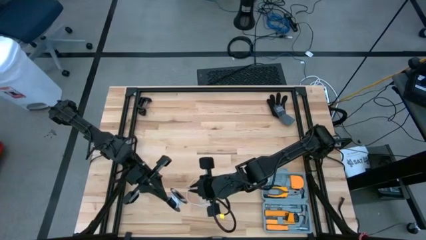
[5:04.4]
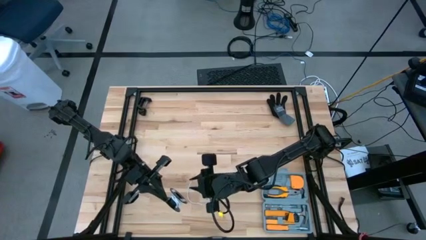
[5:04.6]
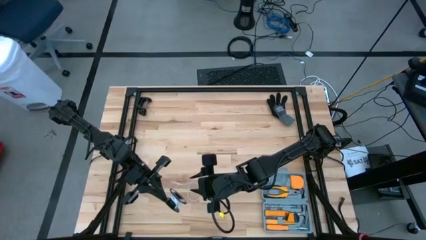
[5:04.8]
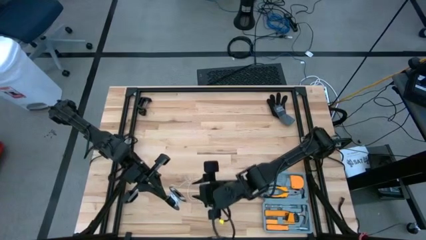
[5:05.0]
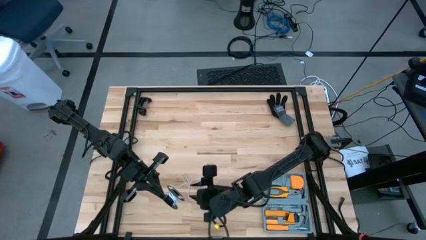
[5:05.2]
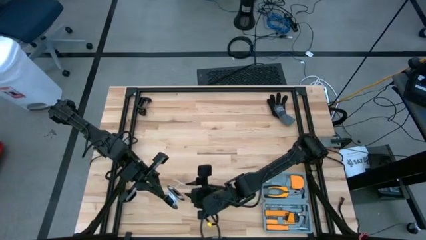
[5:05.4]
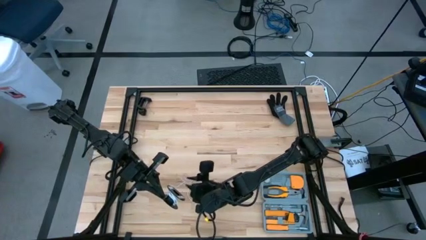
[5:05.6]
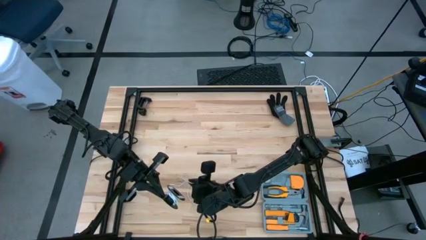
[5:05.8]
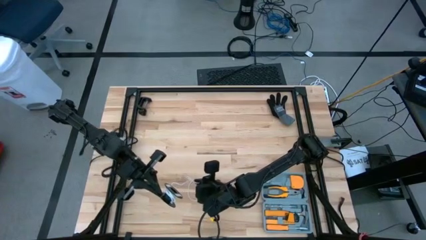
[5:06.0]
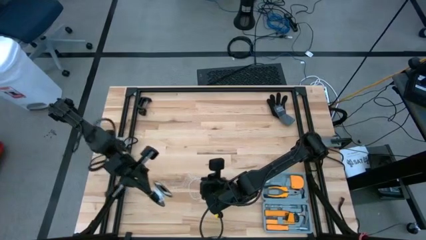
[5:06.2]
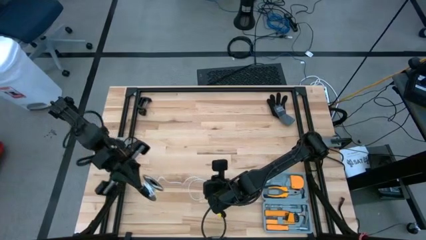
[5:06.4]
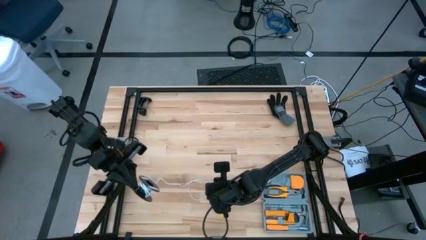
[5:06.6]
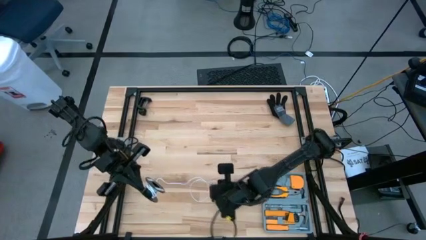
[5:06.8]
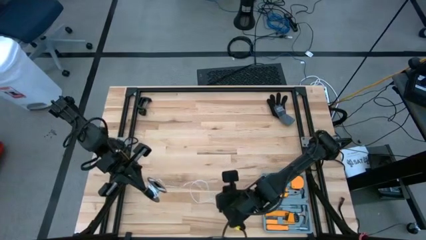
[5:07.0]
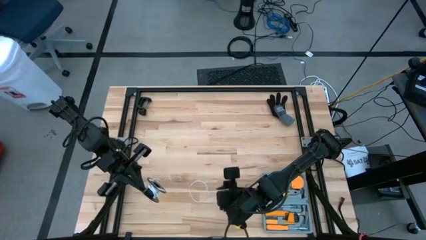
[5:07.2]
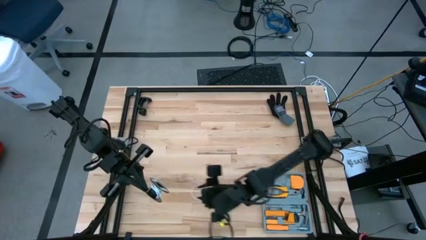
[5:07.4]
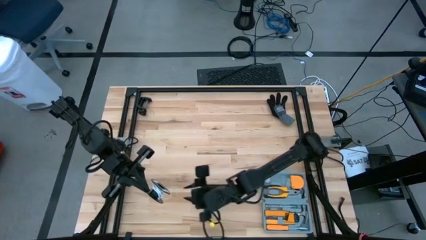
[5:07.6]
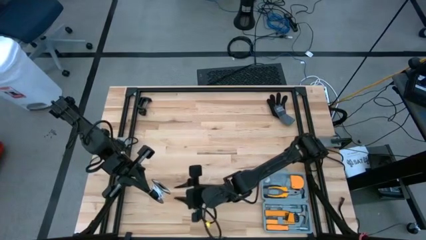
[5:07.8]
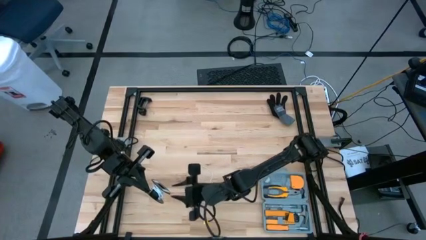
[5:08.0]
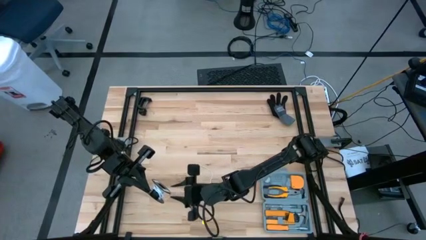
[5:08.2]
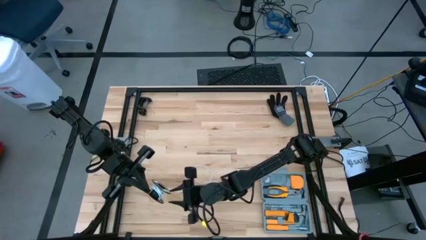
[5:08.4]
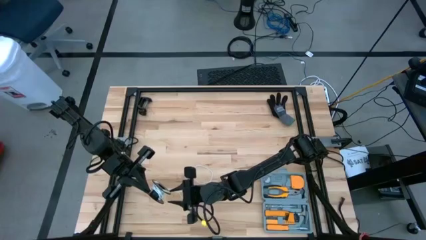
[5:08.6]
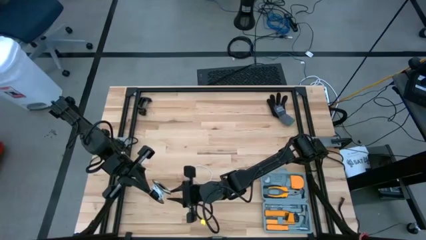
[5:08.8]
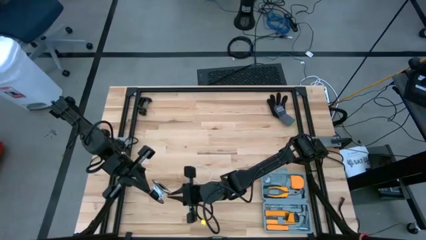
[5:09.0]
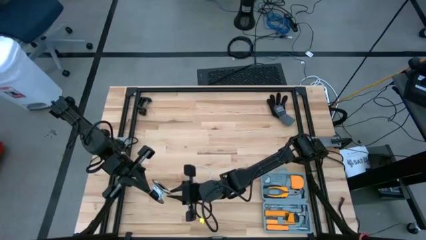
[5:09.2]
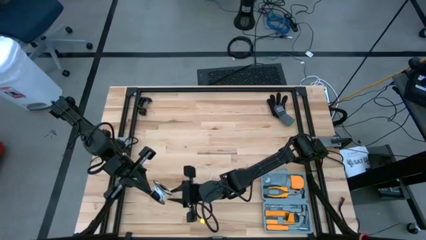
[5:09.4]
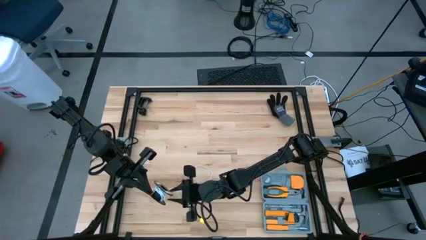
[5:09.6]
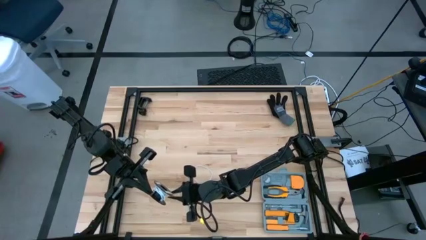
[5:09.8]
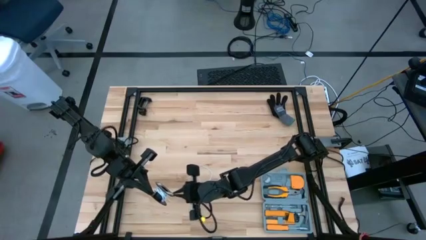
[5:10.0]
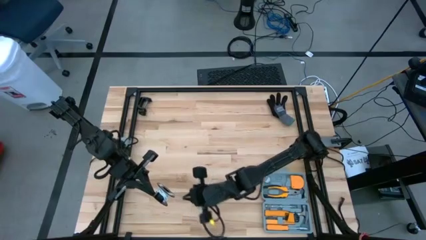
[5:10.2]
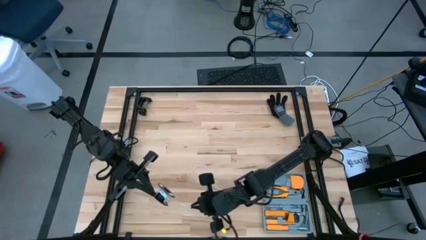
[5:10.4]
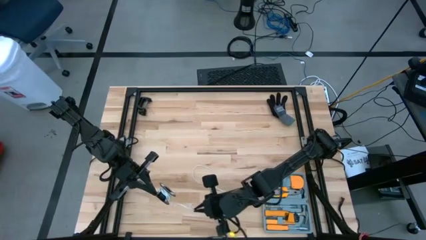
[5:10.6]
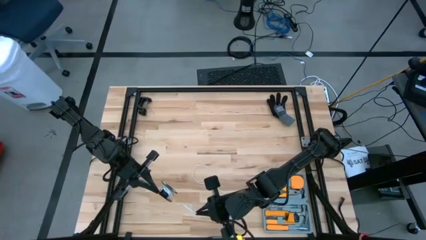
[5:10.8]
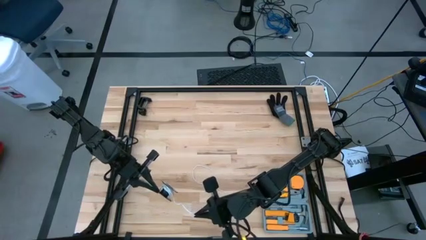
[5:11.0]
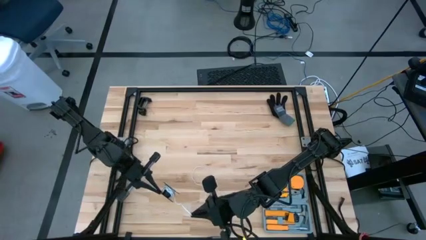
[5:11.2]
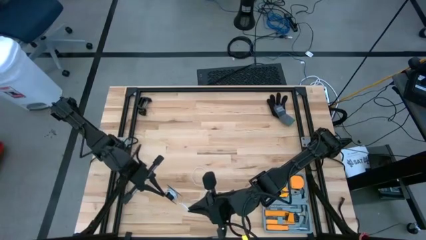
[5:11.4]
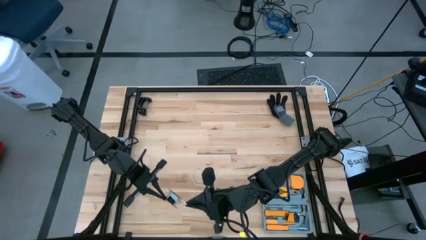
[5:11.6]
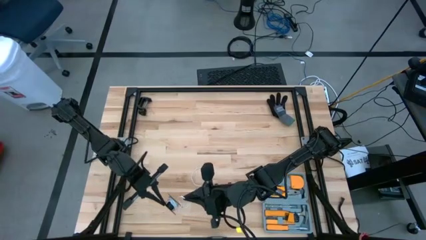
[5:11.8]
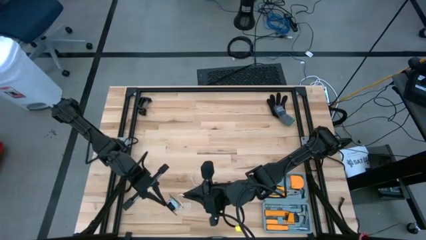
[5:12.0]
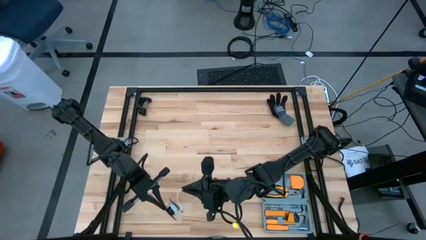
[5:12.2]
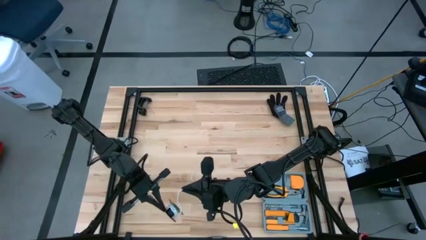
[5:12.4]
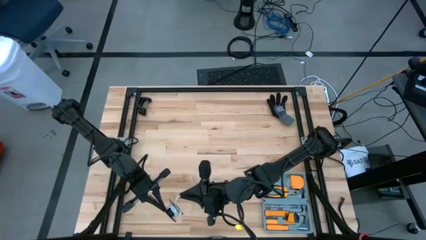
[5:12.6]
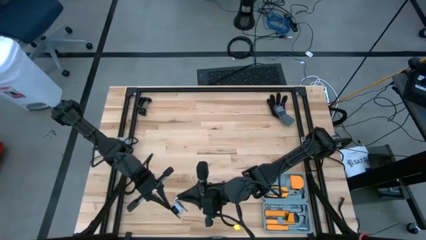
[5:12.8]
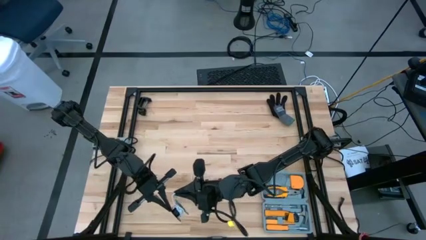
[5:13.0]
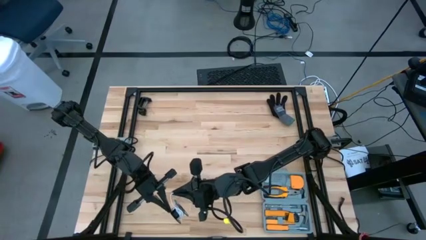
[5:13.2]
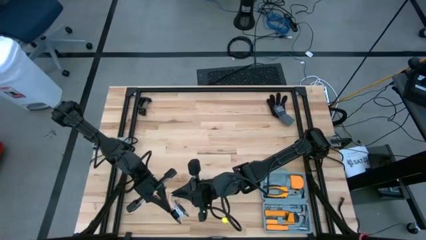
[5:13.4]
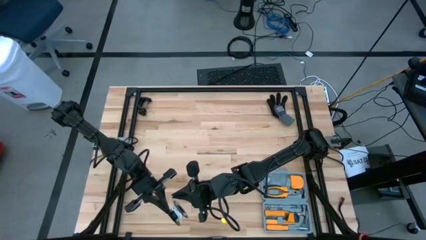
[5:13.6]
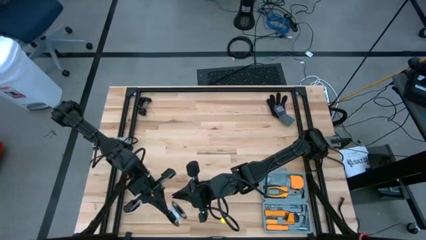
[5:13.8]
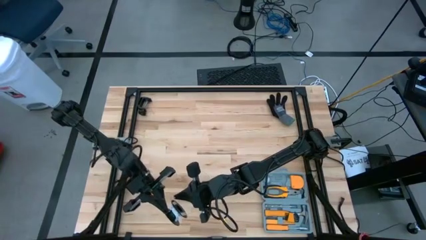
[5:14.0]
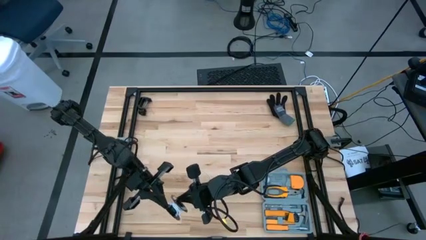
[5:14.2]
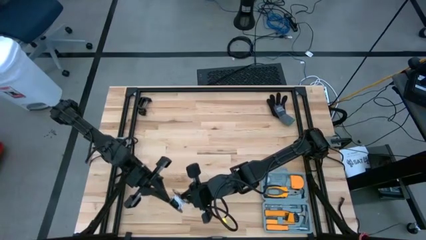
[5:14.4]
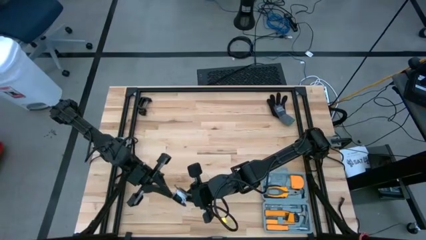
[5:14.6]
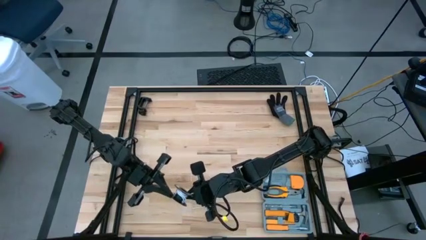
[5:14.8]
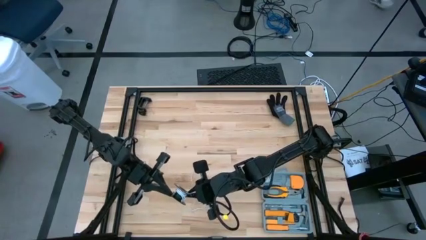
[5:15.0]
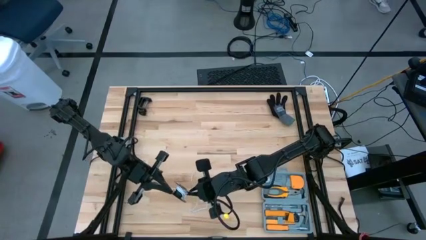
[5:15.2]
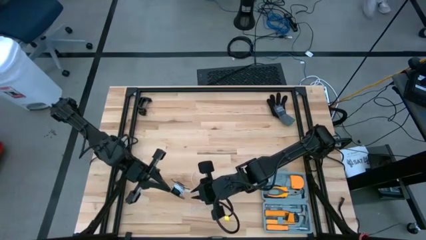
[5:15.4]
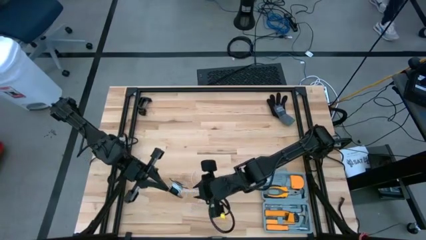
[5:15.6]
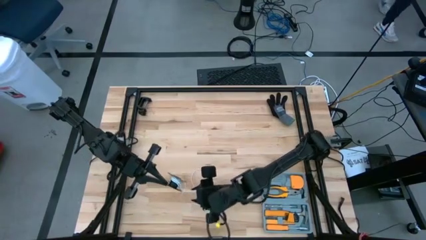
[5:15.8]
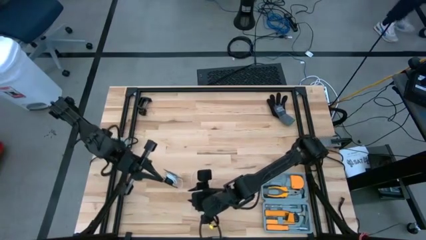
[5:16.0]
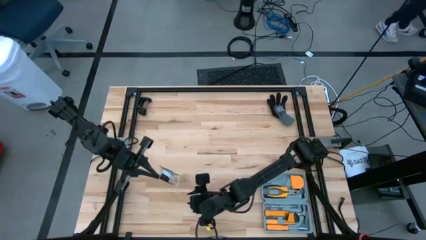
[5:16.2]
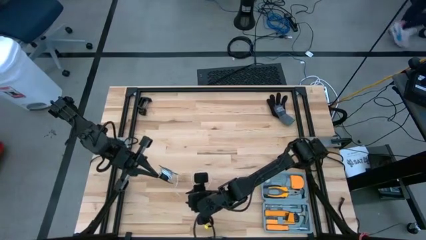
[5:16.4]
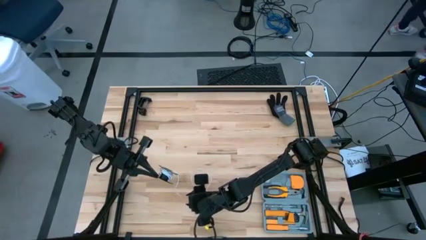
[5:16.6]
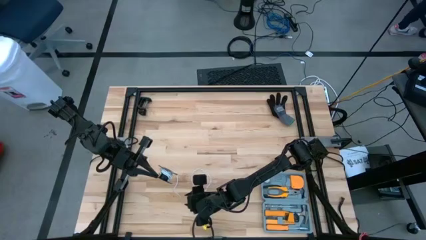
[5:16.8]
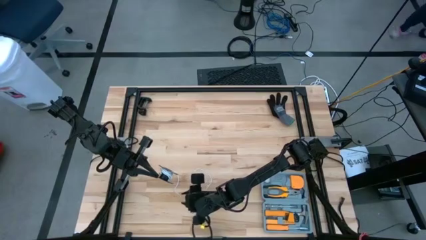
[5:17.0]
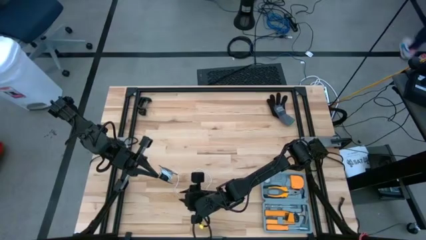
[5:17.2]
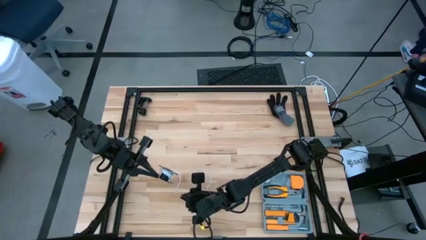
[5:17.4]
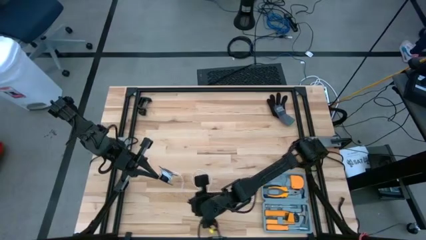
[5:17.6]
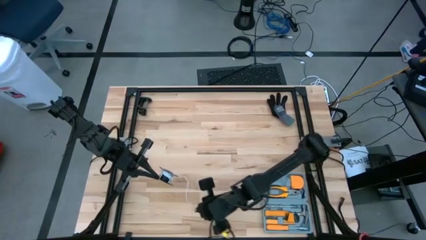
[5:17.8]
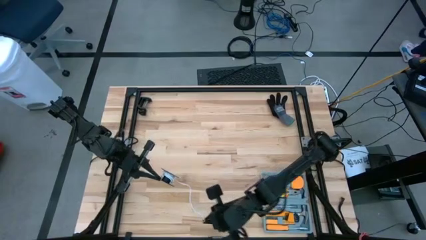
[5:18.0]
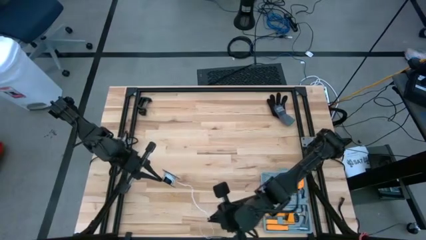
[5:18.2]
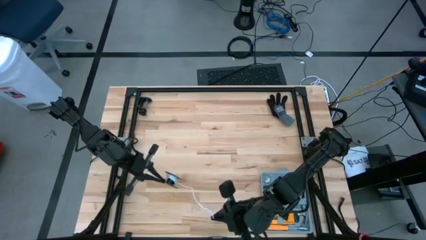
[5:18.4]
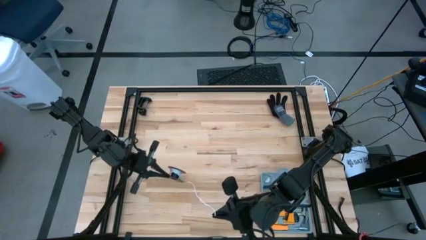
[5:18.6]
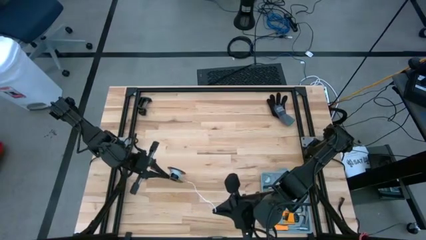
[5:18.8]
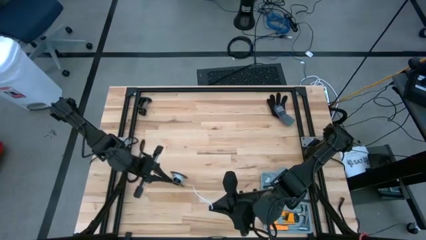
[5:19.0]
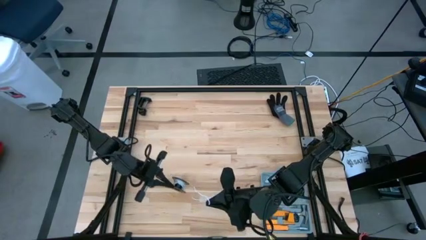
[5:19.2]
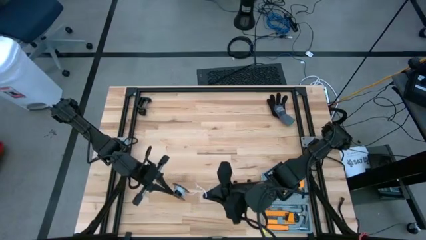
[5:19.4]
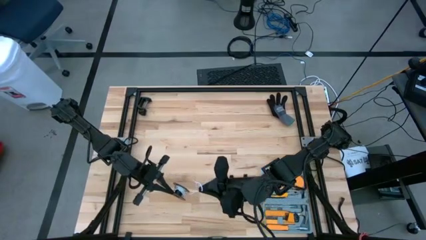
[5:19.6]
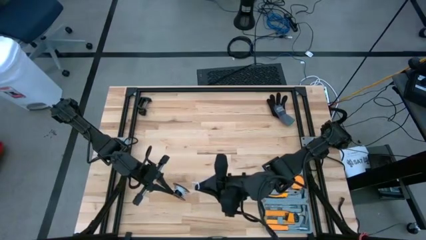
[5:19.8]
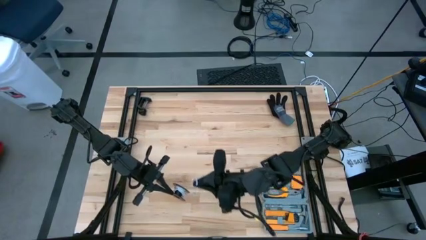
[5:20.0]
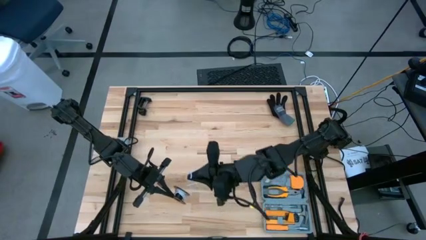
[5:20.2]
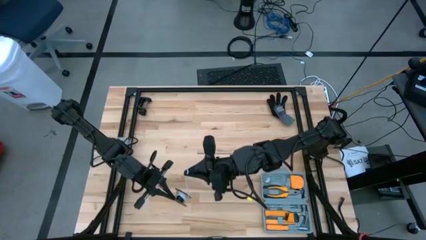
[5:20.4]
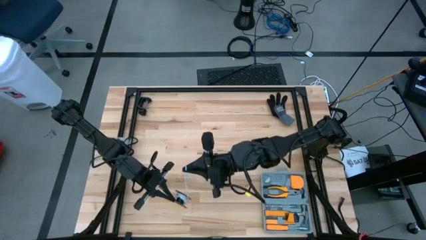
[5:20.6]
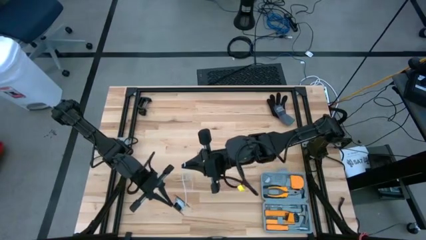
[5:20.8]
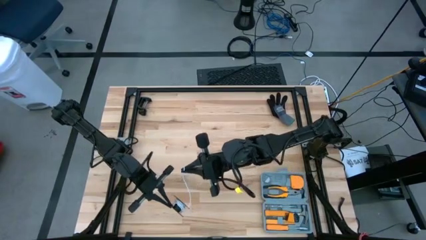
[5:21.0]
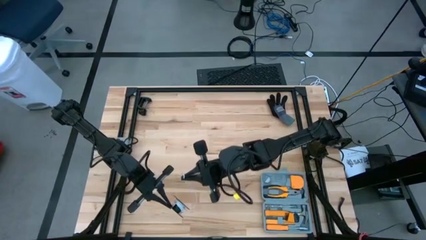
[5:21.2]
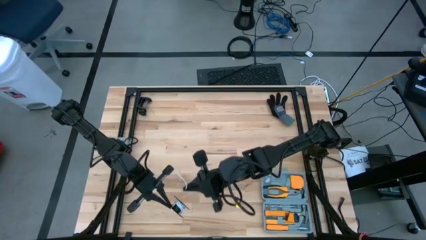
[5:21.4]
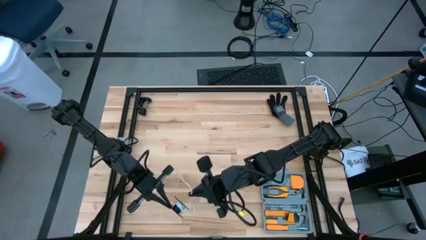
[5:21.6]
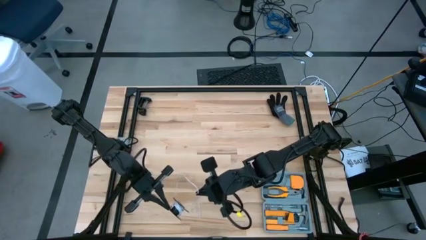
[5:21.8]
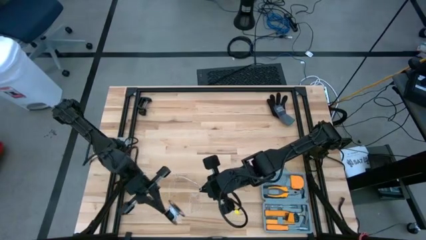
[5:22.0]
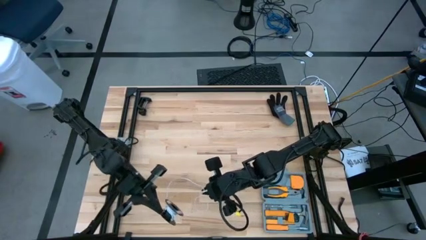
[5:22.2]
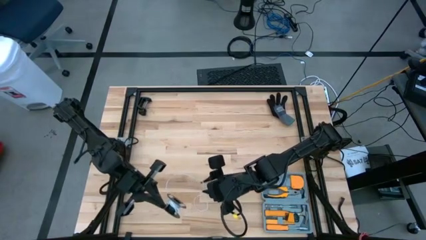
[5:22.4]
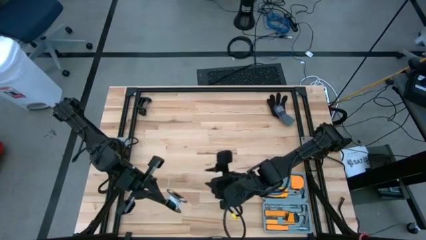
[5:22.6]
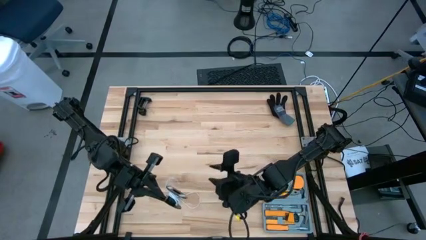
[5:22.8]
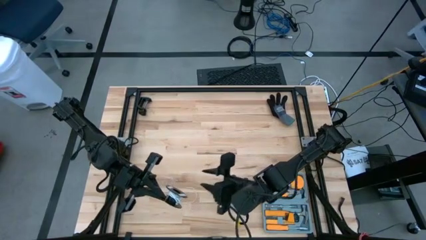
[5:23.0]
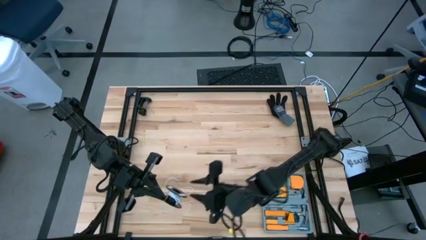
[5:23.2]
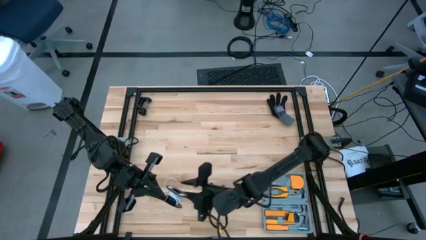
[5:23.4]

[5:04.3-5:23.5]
Task: Coil cords
Coil the white cable wire onto the spool
